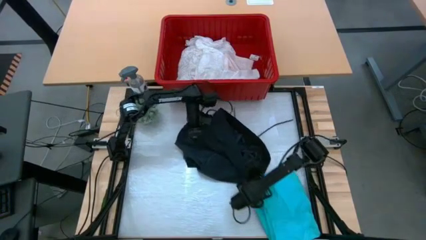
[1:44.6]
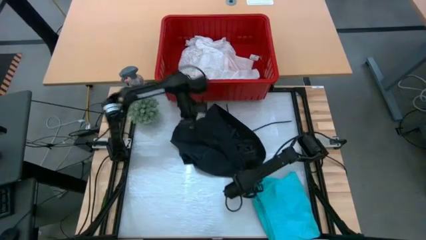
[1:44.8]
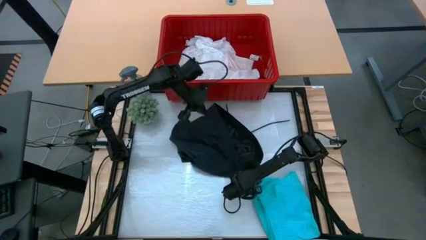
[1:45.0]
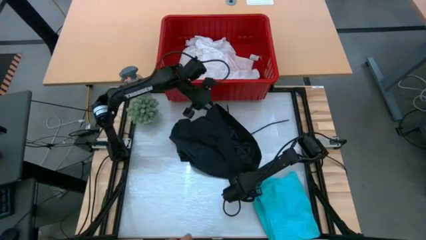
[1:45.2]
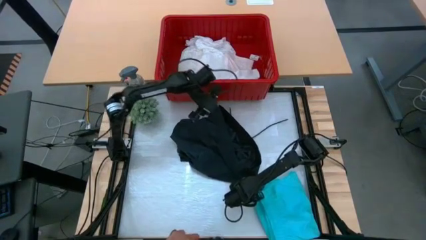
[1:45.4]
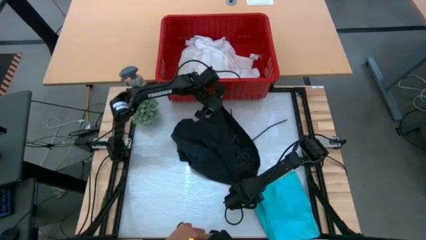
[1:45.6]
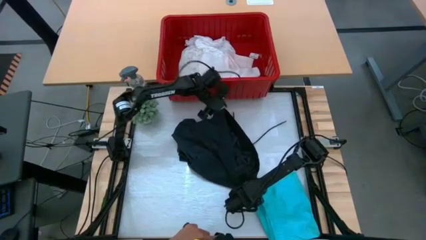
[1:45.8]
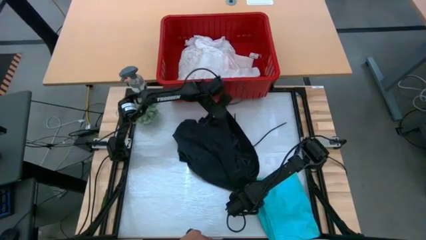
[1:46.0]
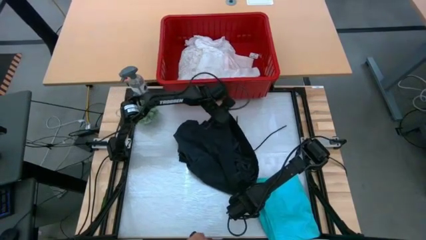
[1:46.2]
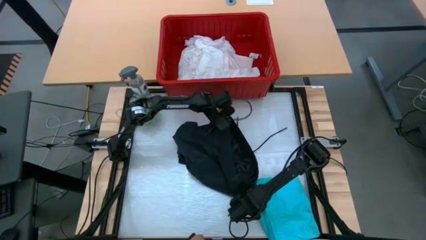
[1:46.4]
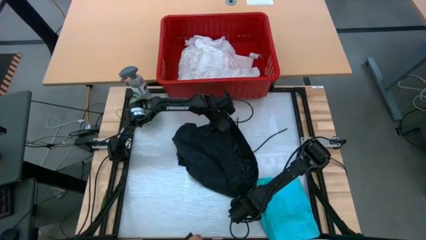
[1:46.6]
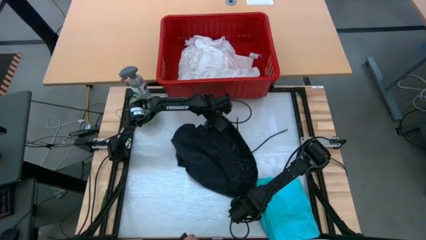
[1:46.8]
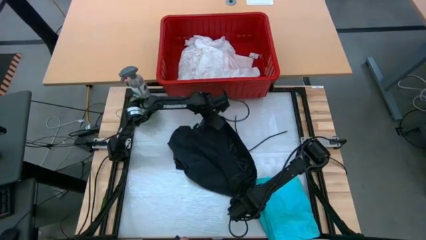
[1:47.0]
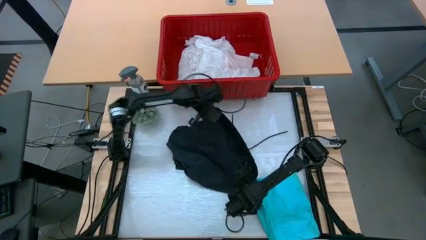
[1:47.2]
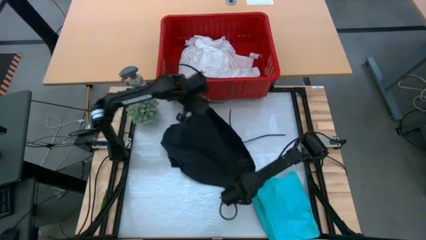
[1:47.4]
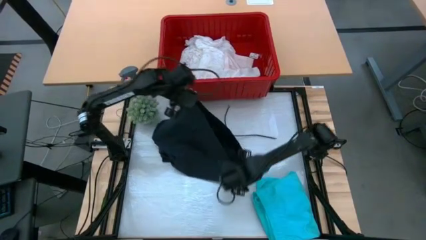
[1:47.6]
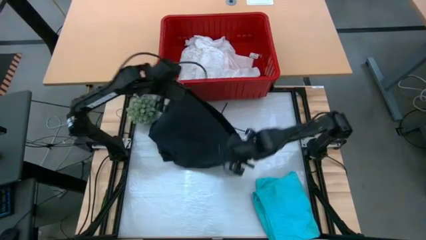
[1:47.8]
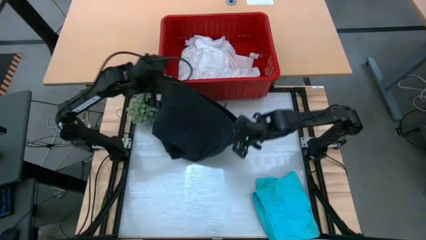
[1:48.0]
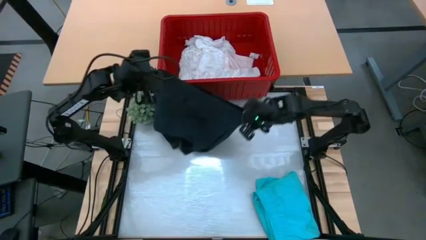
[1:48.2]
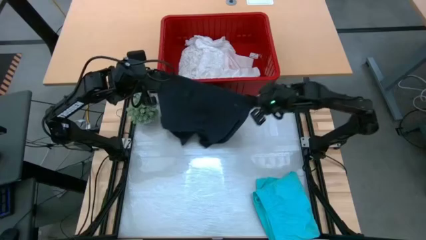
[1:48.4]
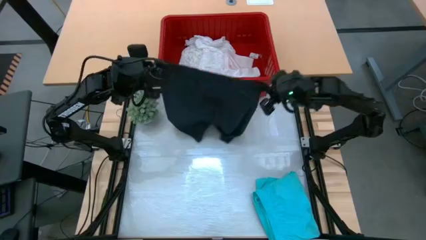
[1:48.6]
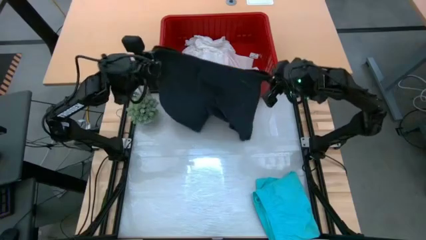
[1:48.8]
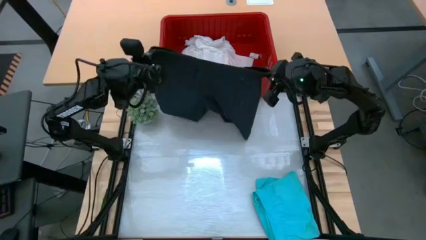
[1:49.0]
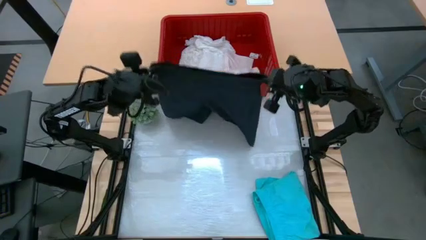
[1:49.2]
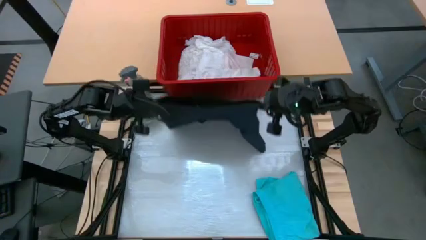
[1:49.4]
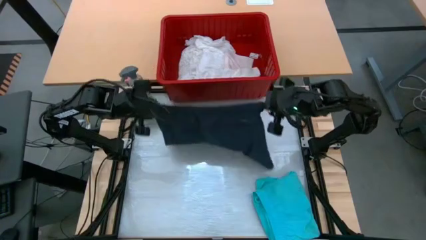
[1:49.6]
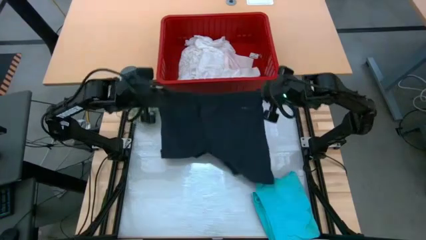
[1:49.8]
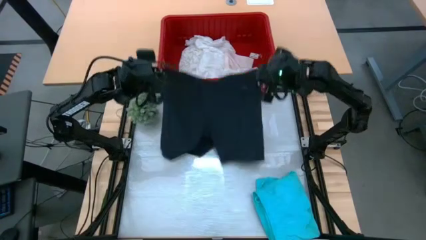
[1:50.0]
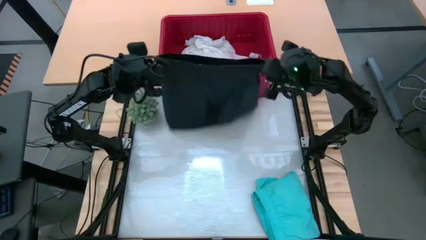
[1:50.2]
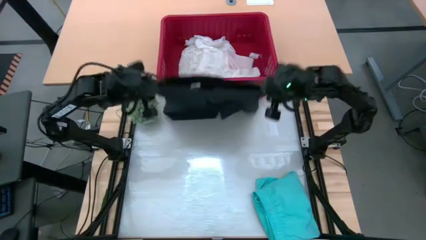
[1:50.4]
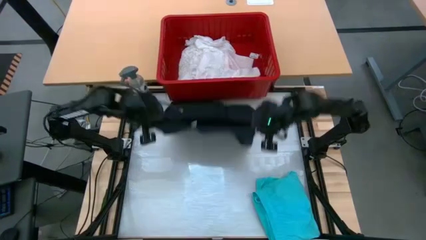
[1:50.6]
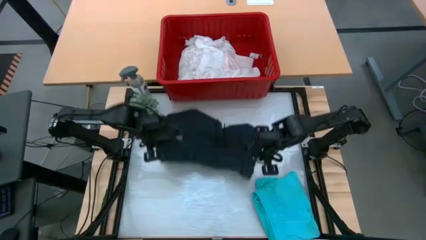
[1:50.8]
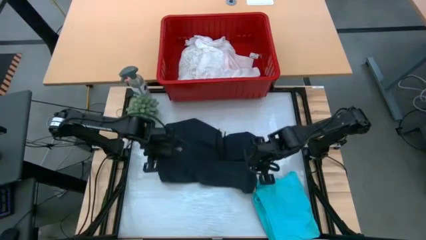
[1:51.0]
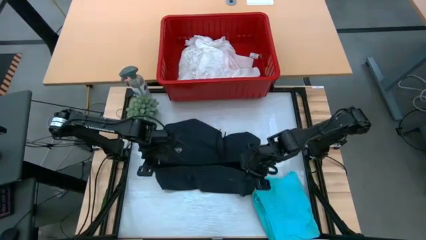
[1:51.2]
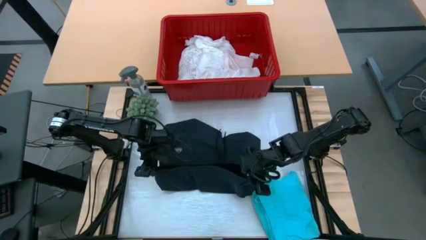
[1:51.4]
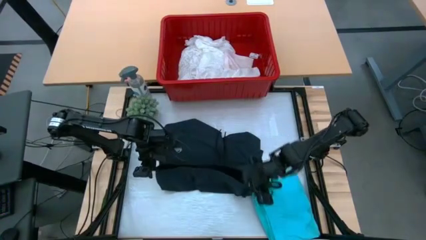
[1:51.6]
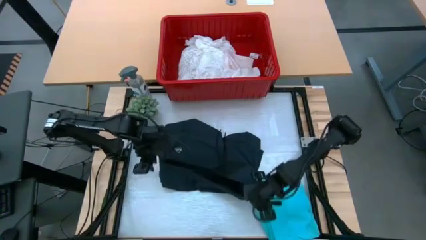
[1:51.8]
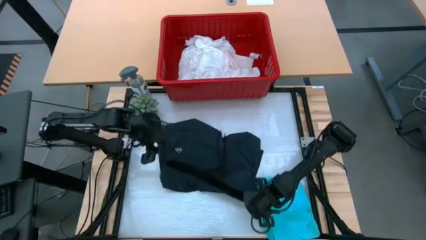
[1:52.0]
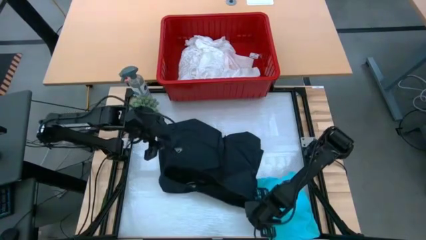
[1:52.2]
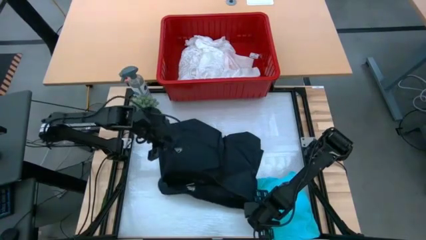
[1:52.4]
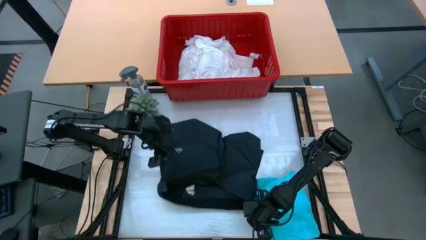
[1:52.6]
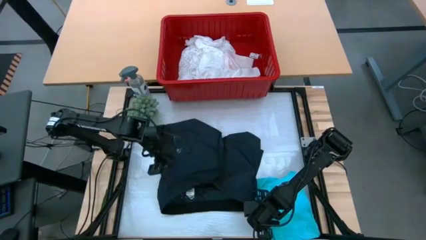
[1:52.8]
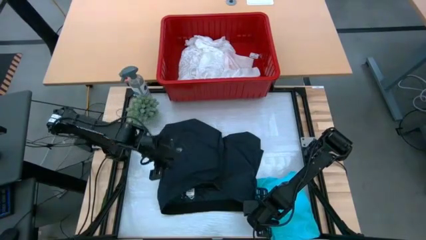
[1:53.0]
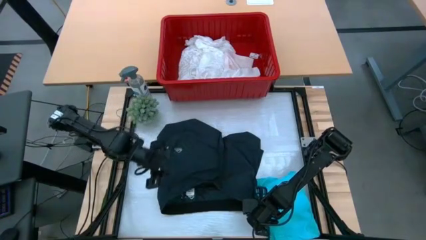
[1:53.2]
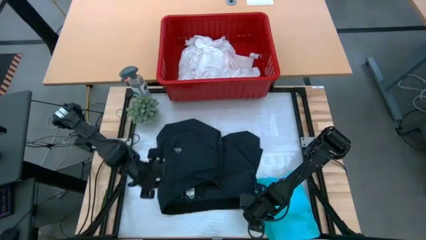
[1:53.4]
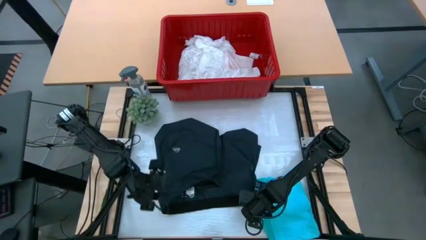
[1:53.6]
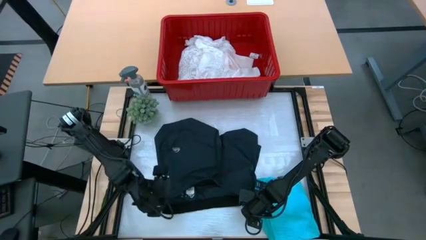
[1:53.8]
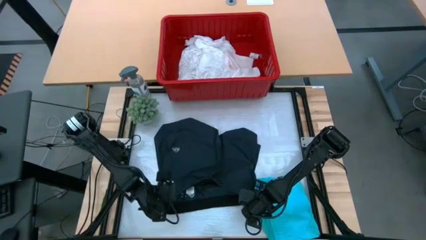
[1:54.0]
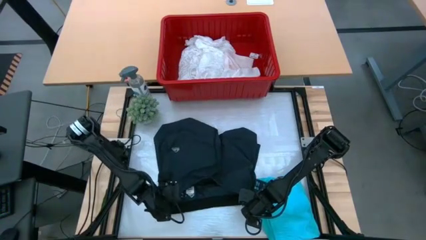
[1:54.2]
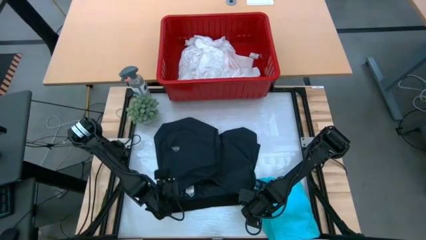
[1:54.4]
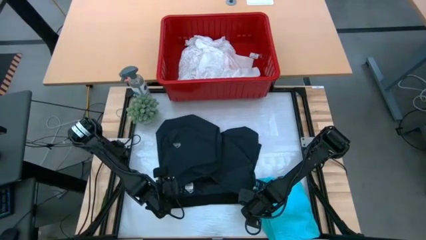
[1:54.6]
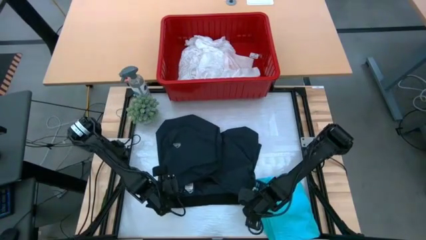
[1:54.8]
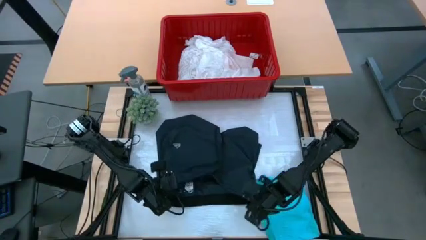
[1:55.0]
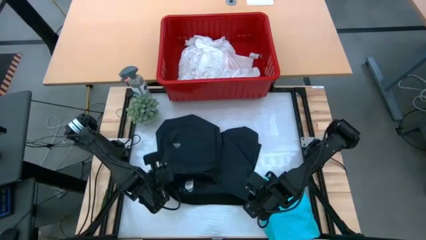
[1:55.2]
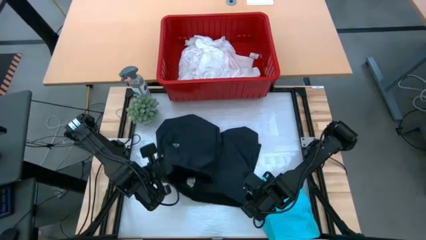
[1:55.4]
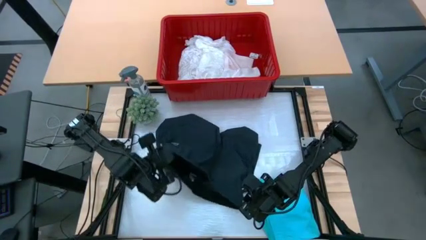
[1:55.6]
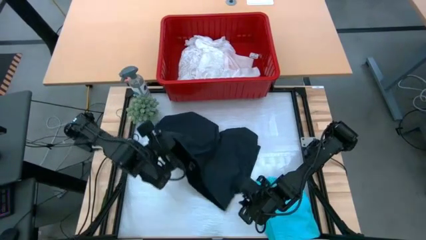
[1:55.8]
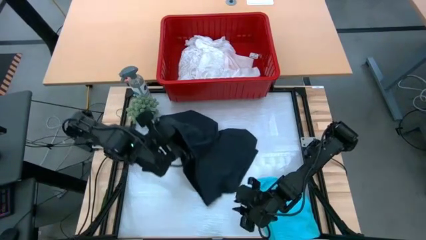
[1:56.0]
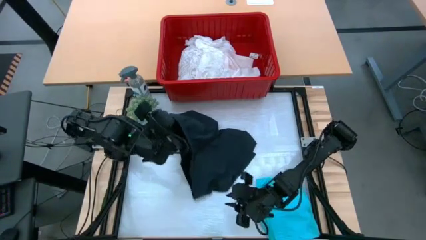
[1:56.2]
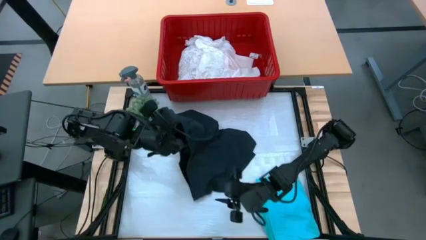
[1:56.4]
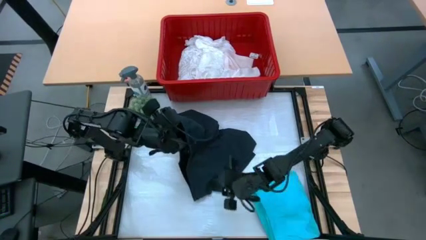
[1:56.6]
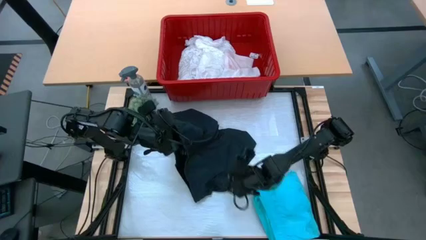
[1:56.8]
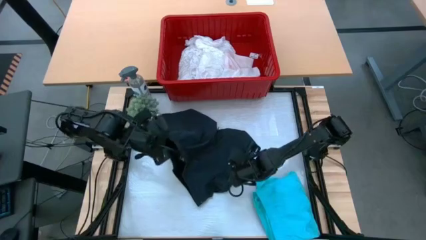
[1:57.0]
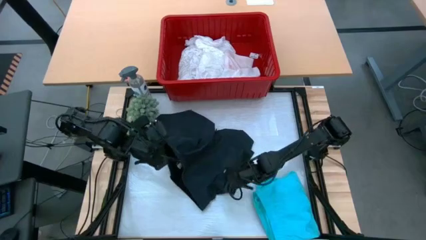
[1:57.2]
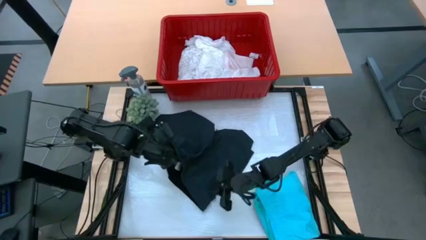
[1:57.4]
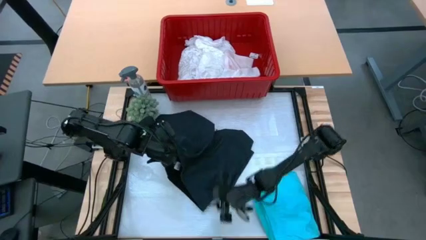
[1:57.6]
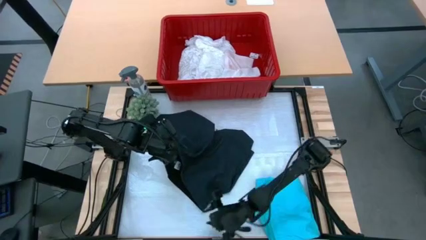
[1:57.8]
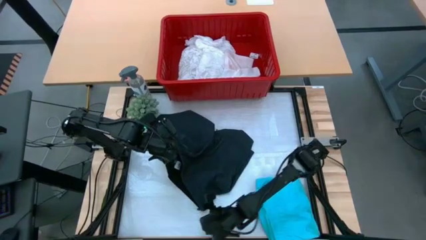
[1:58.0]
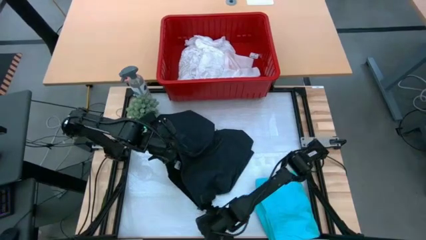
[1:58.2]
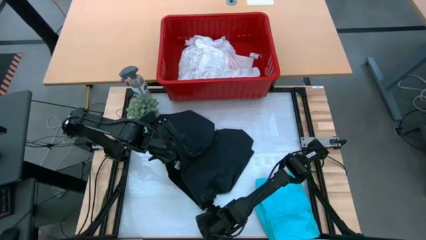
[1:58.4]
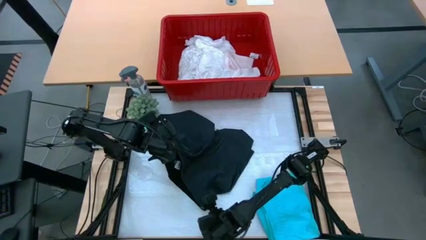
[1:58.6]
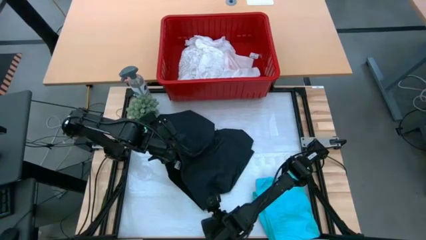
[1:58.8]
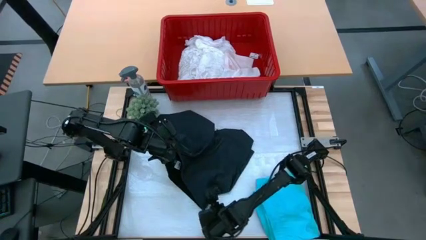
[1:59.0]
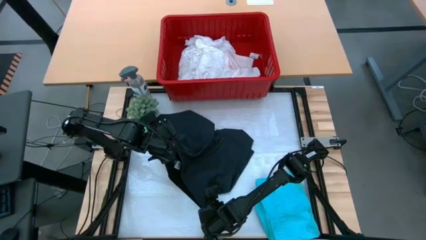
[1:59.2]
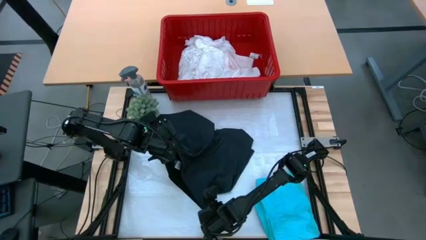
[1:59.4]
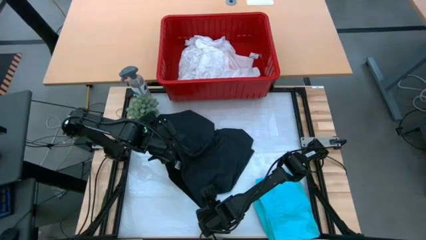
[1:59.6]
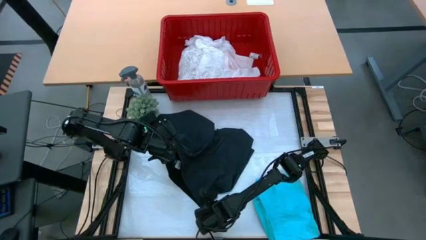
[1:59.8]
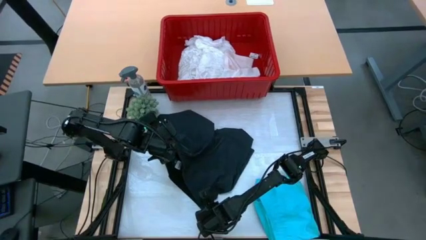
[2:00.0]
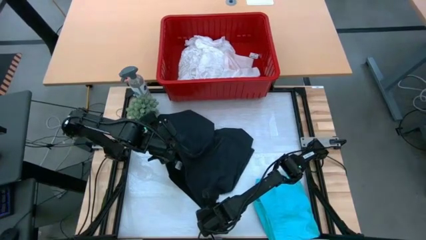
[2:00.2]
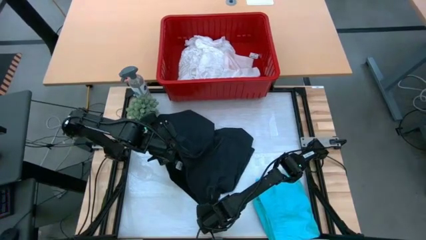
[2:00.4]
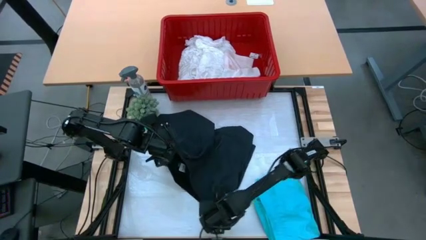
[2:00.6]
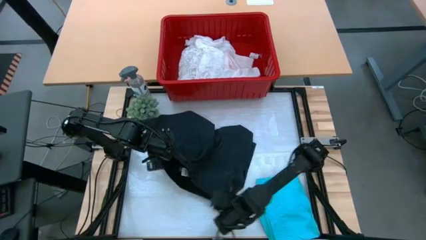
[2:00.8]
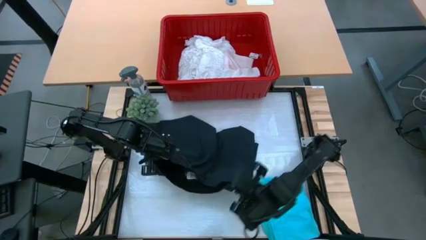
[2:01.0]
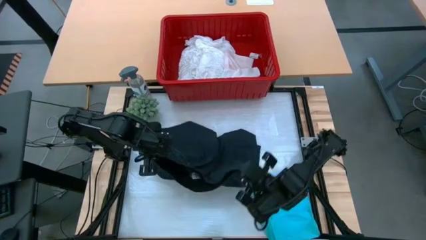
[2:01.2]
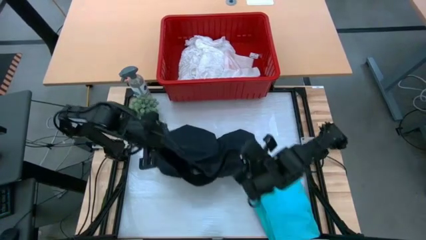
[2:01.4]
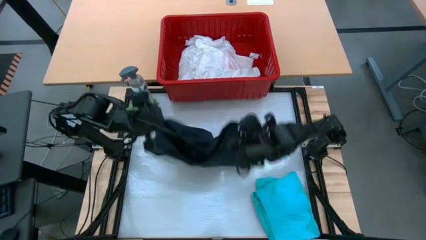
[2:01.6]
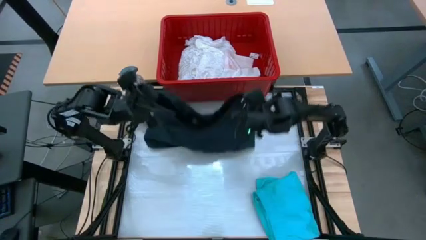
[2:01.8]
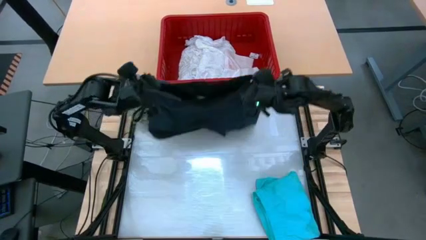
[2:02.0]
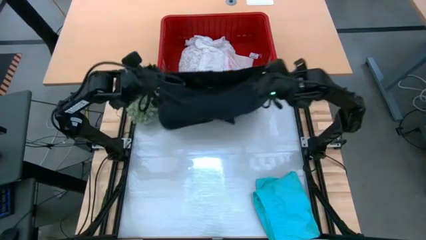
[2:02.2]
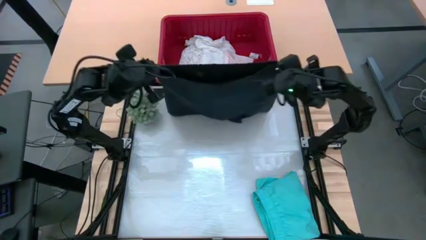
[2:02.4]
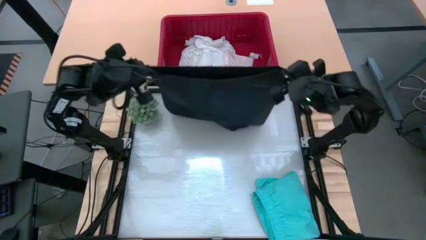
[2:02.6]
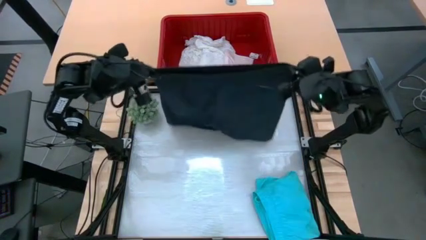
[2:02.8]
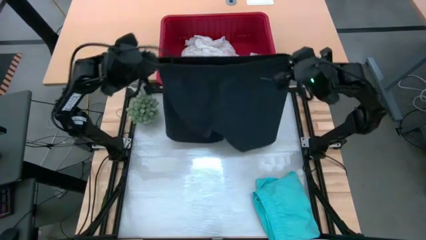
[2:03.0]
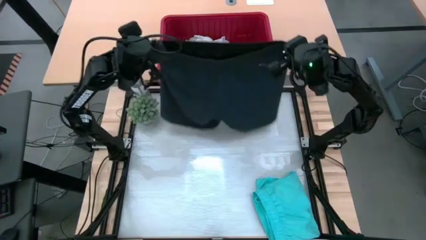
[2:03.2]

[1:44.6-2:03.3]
Task: Fold Laundry from Bin
Fold the black shorts
